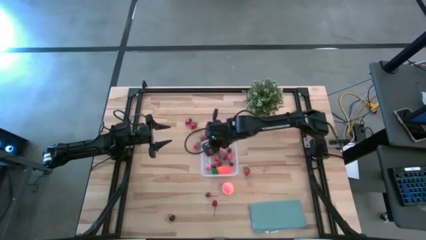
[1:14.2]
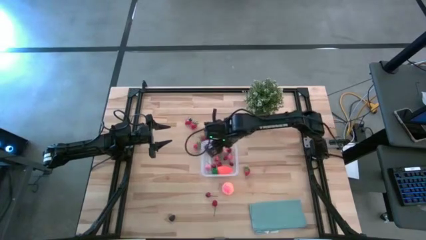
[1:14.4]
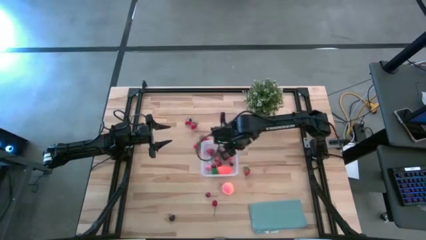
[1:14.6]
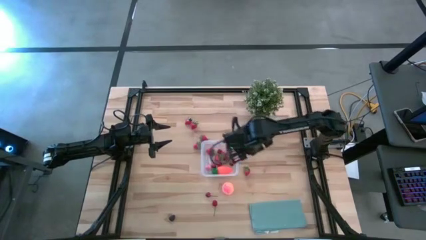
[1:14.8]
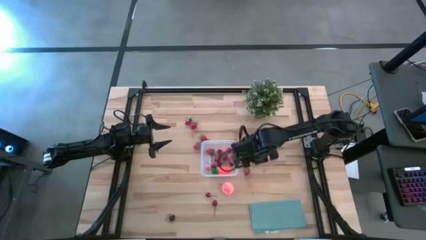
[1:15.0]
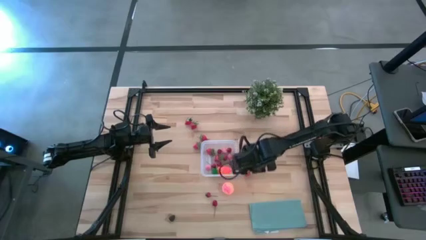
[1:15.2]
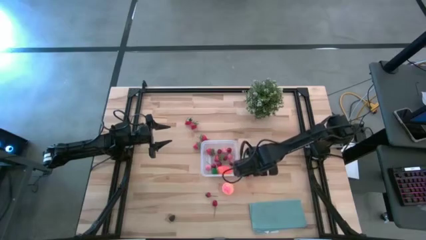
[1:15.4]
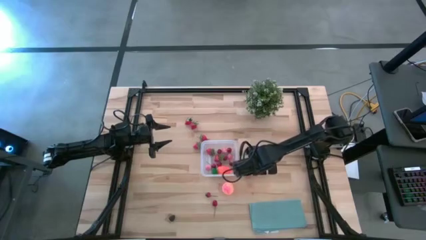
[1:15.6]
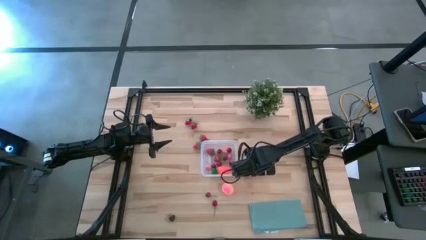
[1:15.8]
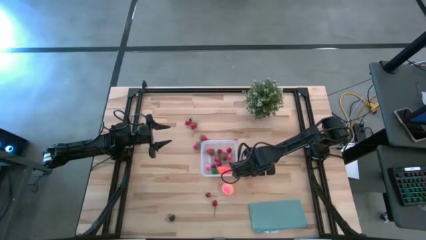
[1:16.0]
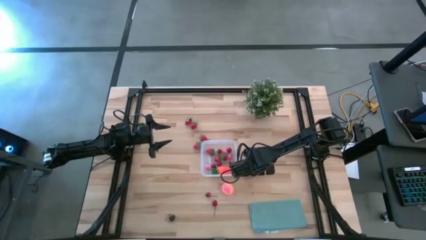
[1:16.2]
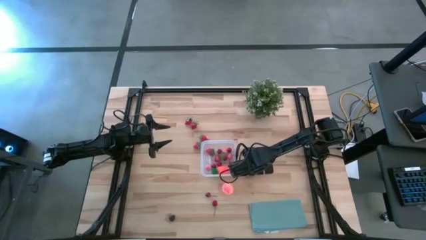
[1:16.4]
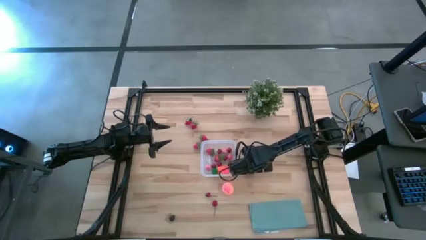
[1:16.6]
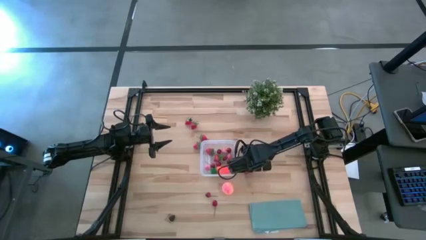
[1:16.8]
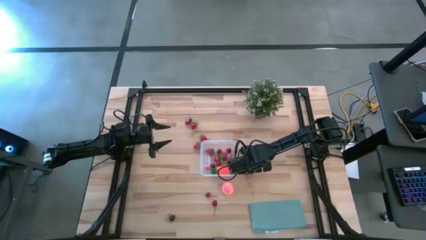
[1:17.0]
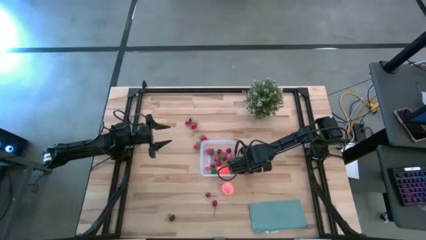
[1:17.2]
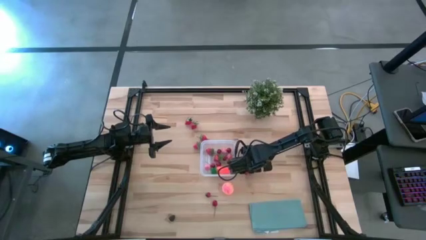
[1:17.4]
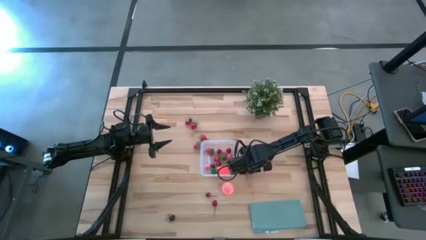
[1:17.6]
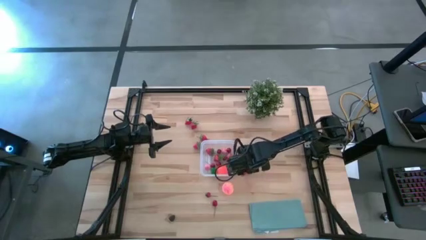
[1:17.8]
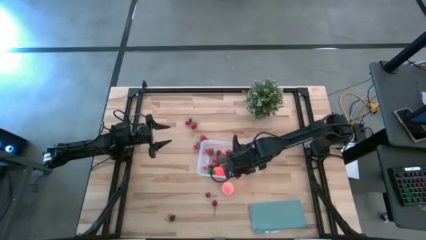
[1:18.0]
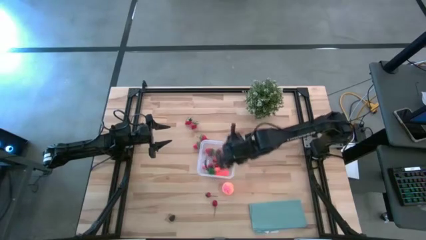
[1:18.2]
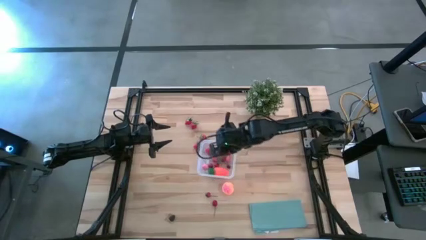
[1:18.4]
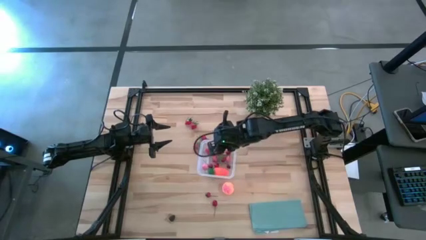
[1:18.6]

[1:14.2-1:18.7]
Task: Pick and placing Produce into tupperware
Put the strawberry into the transparent bin

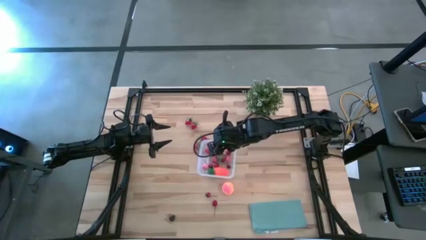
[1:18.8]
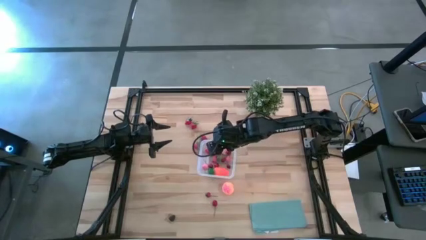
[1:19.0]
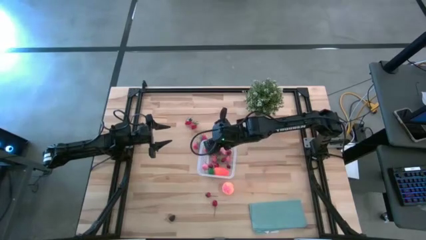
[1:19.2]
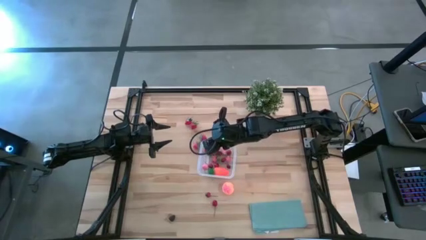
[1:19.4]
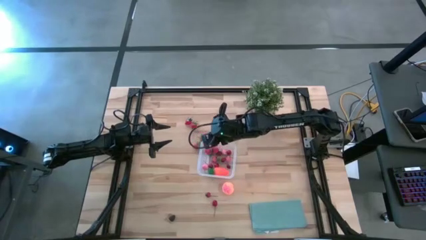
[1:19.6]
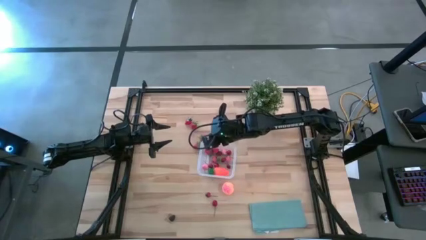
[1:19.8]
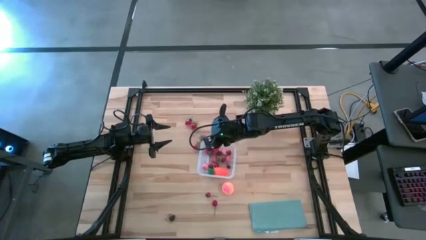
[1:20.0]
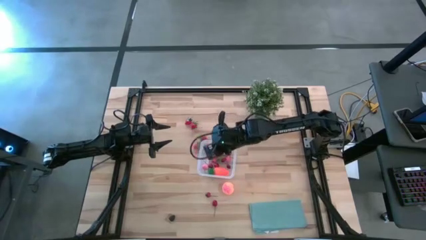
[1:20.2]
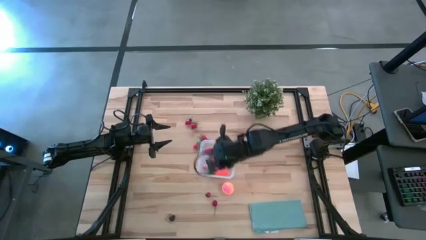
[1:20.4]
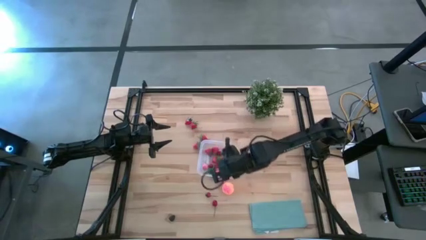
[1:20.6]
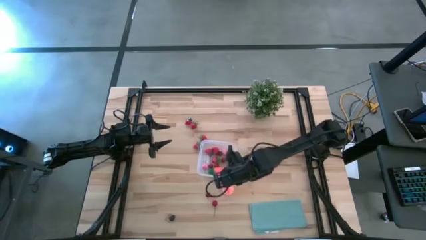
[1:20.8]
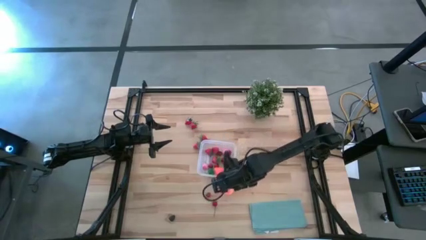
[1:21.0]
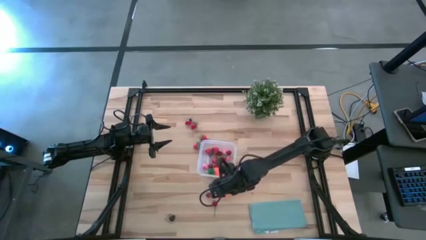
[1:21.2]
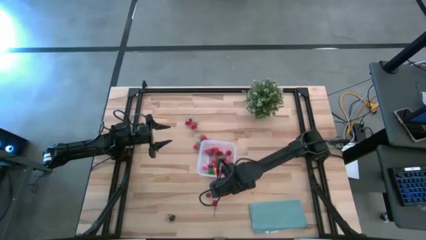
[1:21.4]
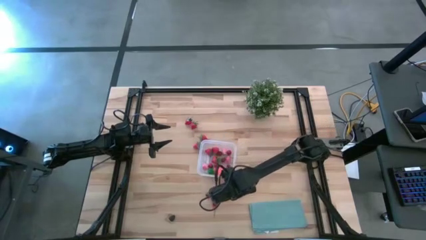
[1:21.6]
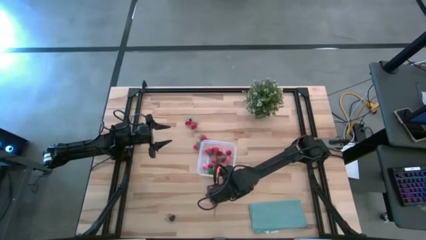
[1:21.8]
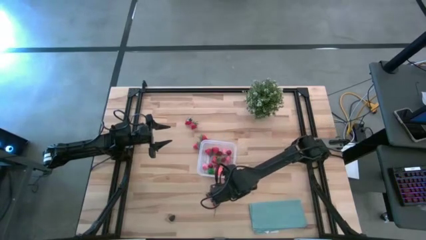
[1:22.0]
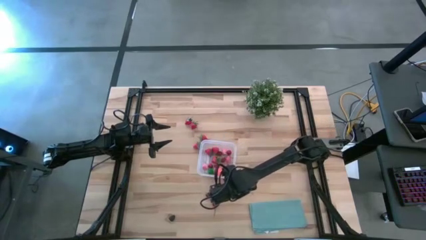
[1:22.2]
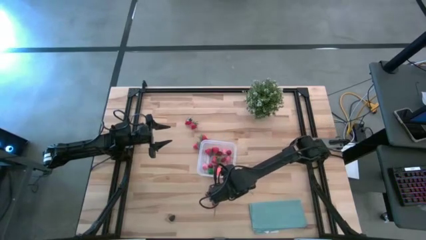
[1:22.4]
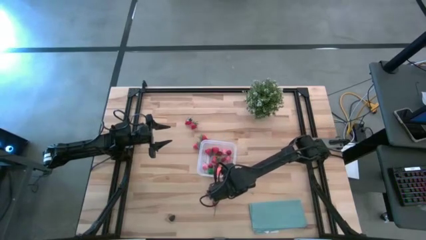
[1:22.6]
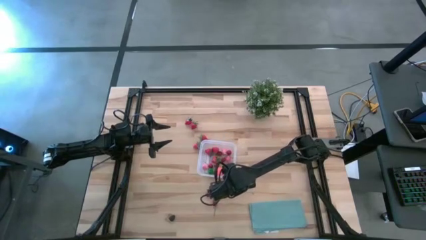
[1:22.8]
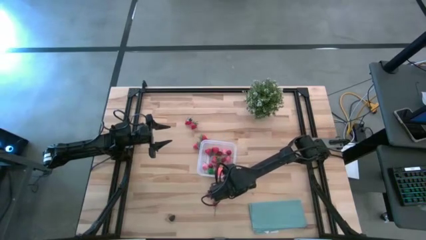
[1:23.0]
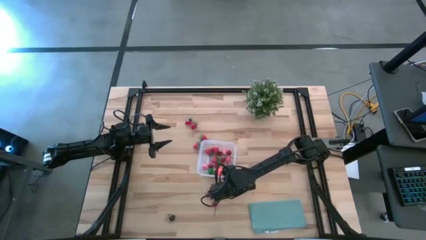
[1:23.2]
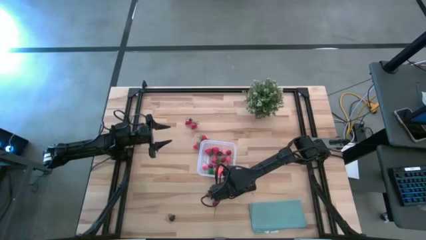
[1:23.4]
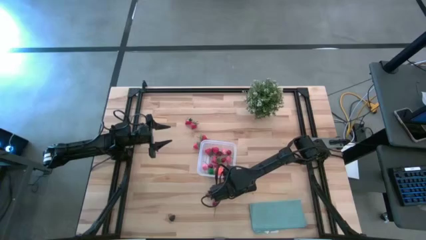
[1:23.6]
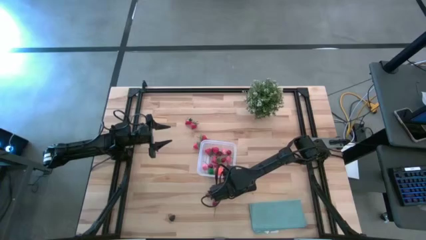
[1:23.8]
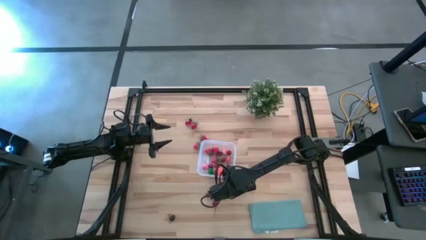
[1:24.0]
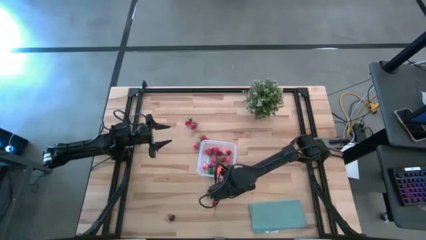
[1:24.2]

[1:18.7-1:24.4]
Put the peach into the transparent bin

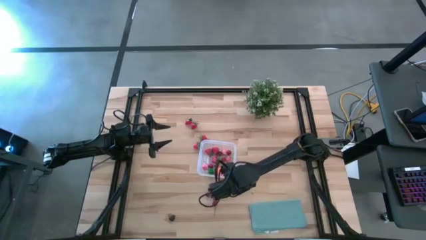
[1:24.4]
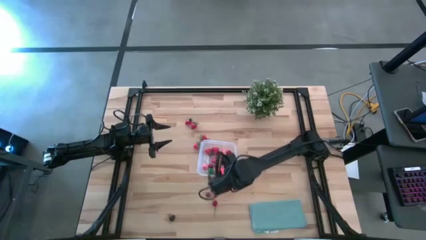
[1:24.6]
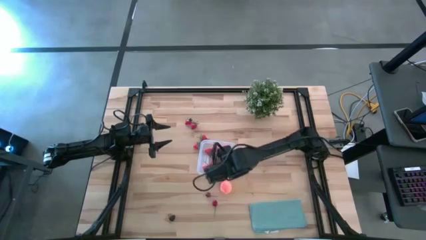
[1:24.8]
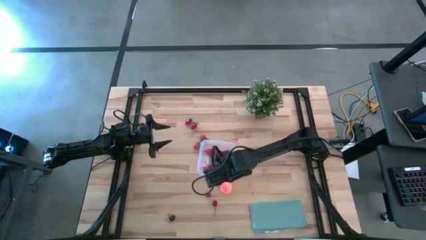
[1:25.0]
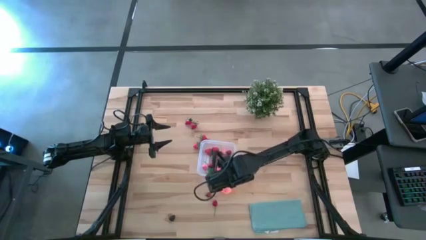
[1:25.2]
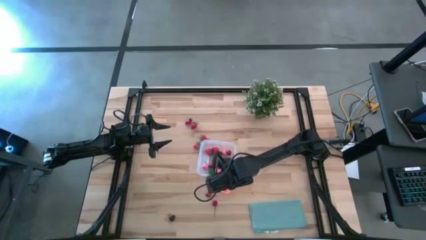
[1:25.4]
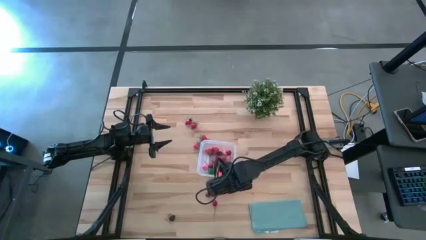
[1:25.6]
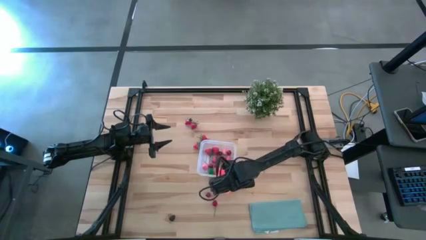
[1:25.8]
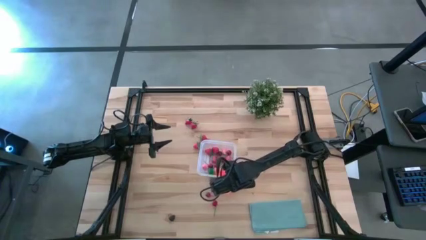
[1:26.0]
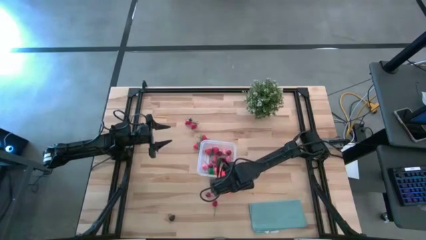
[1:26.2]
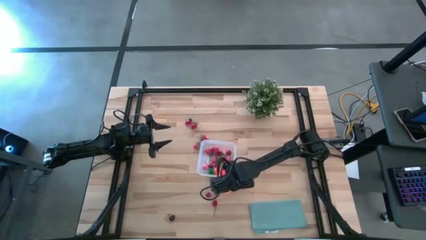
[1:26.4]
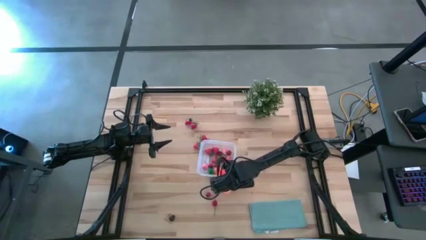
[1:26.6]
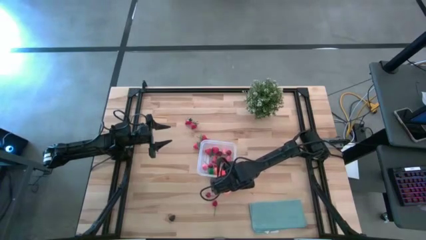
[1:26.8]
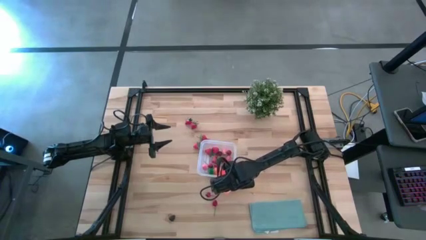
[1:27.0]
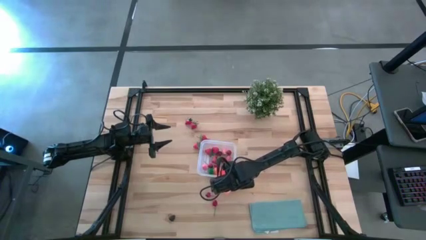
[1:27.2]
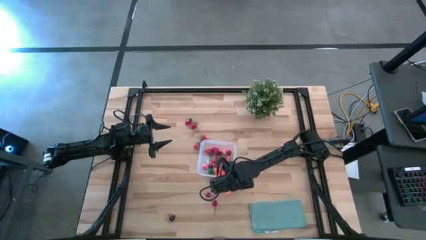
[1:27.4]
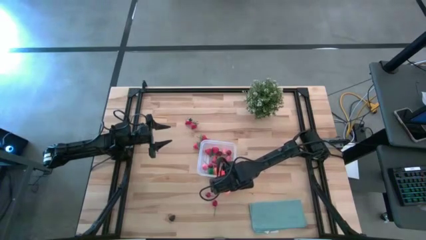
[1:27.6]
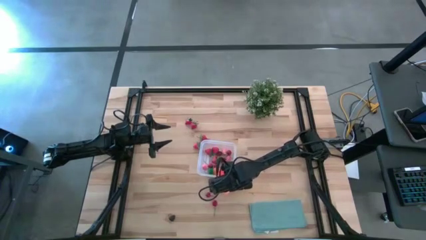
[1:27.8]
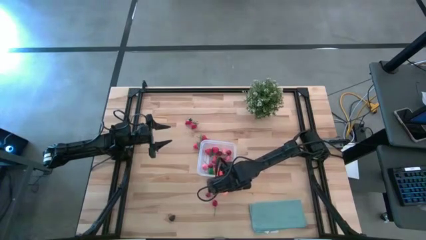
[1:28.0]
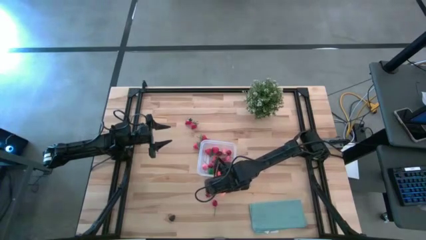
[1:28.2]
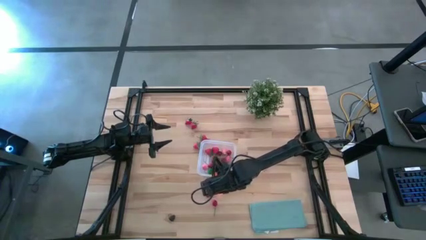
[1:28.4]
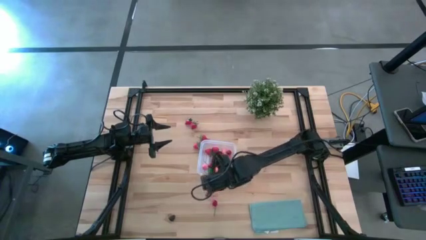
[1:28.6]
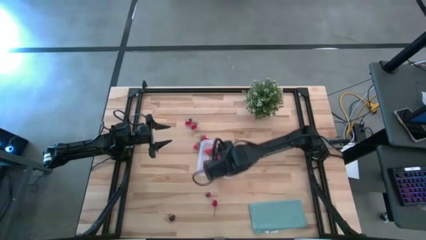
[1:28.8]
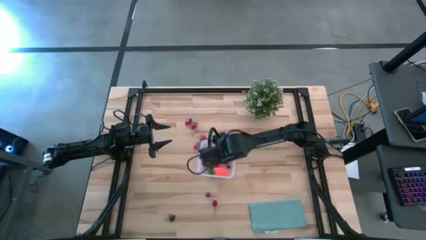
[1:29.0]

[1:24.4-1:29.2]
Put the peach into the transparent bin

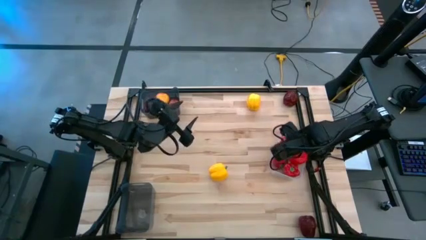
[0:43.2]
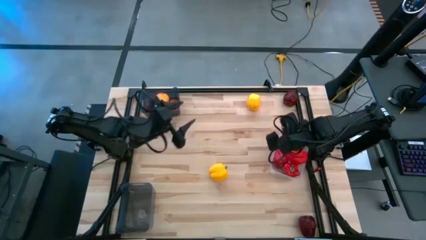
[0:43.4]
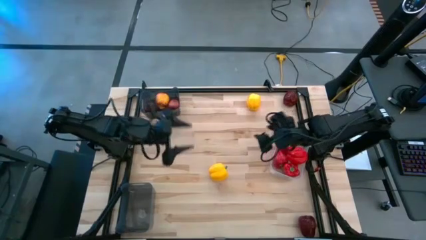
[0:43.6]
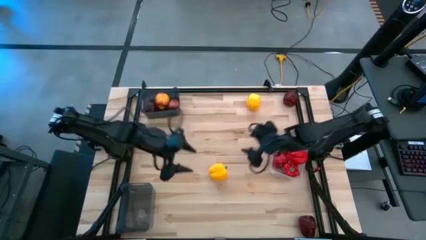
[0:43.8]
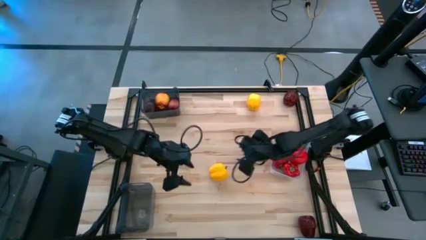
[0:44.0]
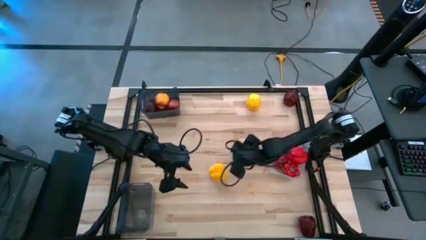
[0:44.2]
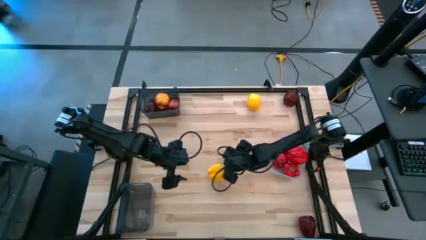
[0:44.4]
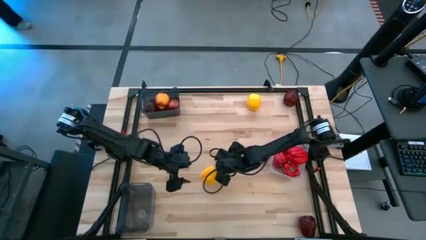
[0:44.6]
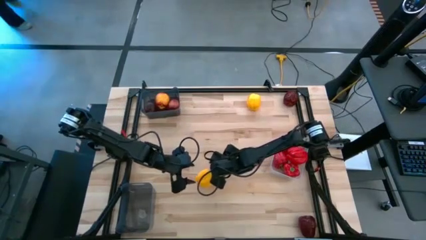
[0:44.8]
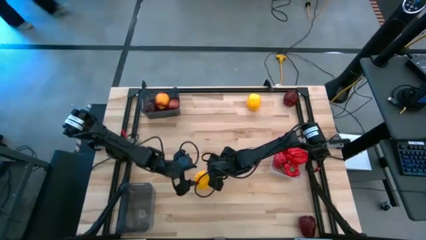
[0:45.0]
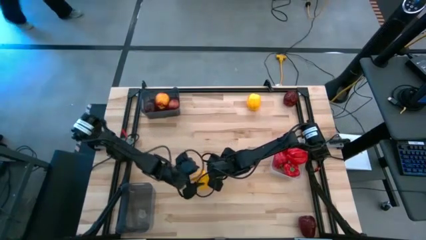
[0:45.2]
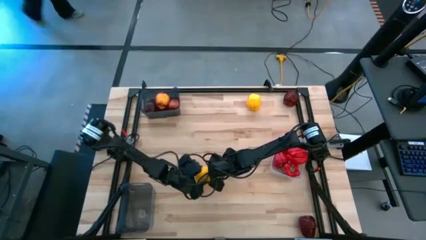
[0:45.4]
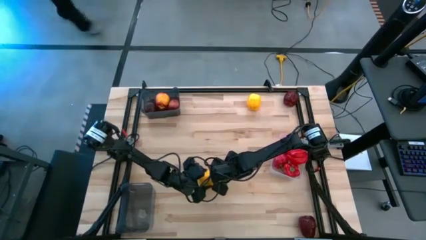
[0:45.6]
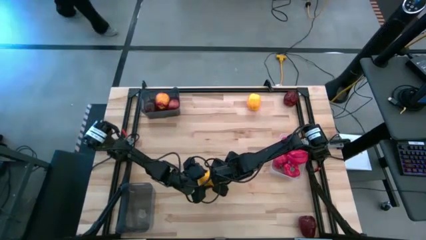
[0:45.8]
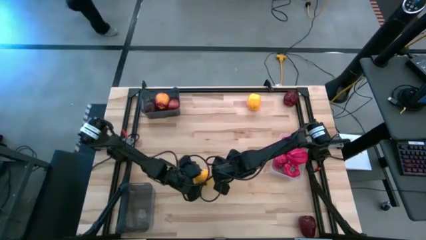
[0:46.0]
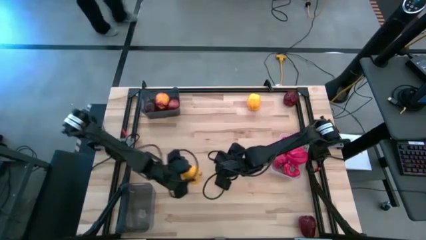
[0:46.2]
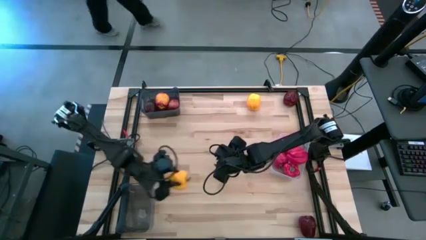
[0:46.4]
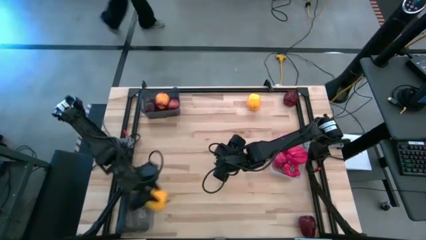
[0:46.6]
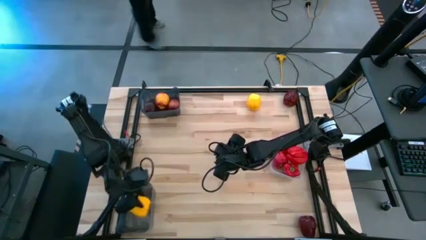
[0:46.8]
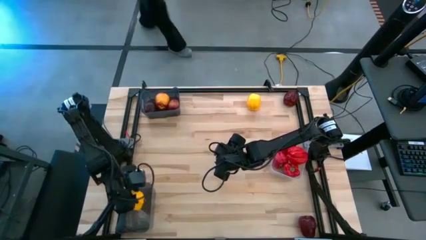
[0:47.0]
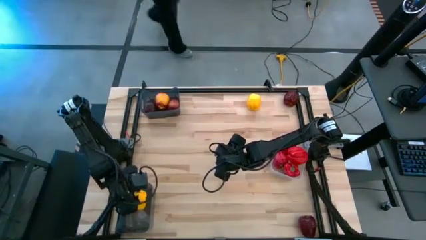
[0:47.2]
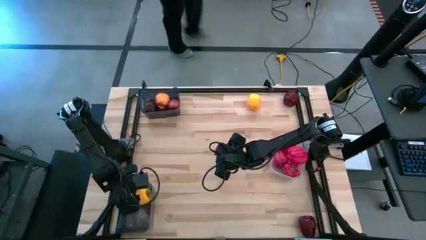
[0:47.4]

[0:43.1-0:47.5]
Task: Sort produce into baskets
Put the yellow bell pepper into the bottom black bin
